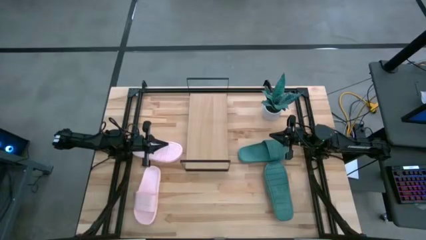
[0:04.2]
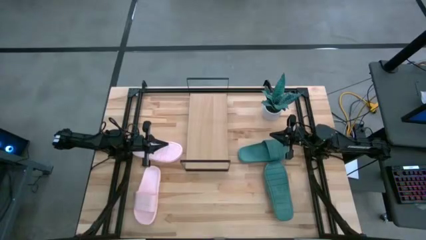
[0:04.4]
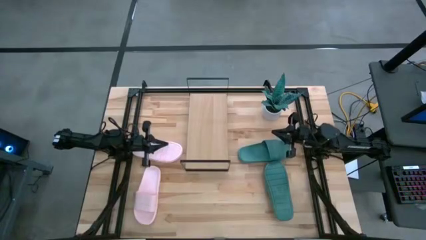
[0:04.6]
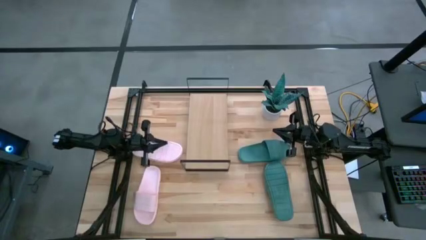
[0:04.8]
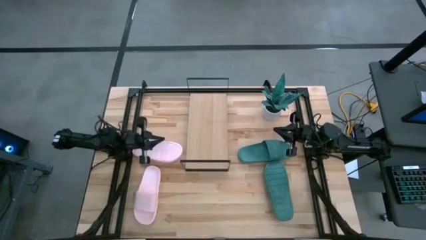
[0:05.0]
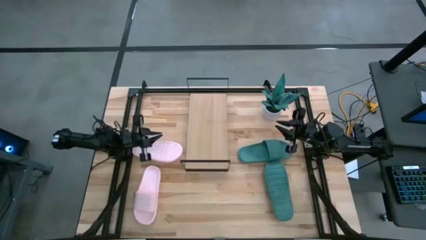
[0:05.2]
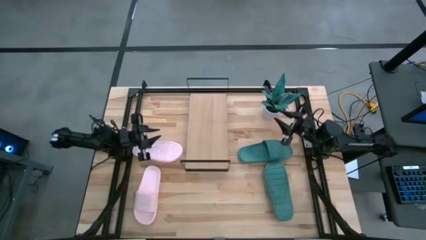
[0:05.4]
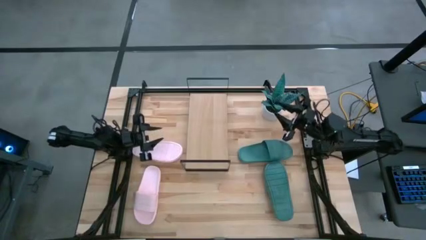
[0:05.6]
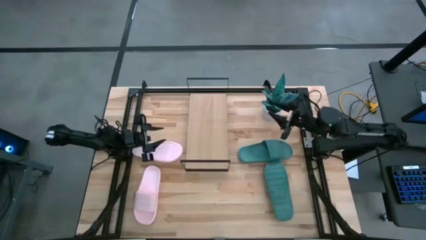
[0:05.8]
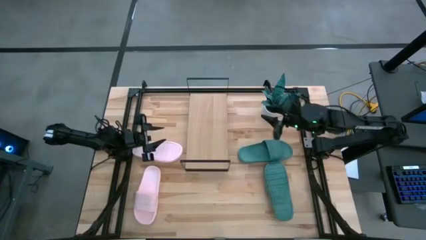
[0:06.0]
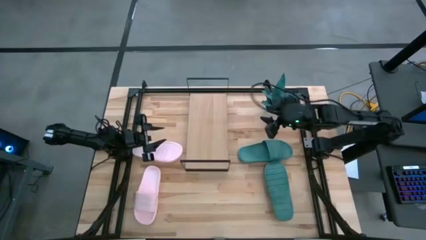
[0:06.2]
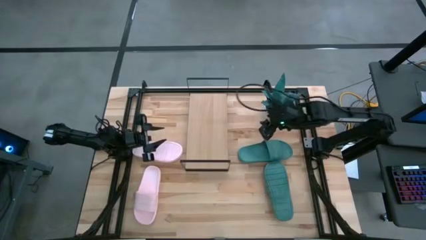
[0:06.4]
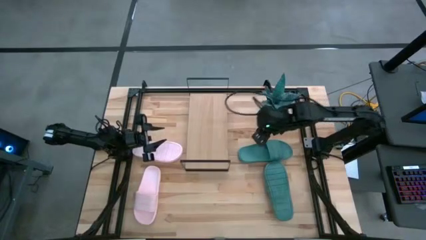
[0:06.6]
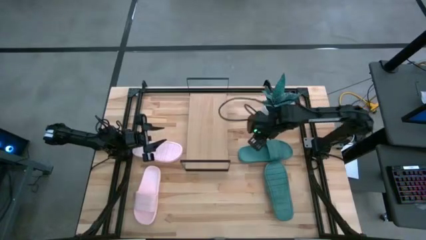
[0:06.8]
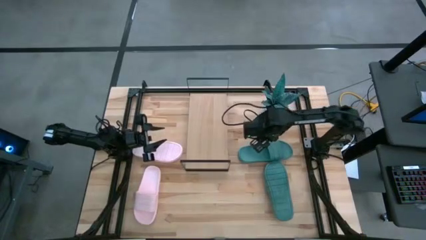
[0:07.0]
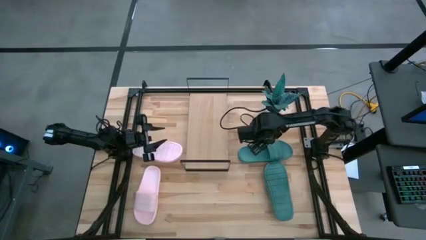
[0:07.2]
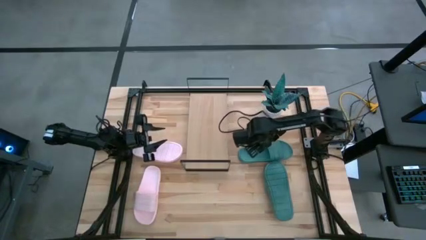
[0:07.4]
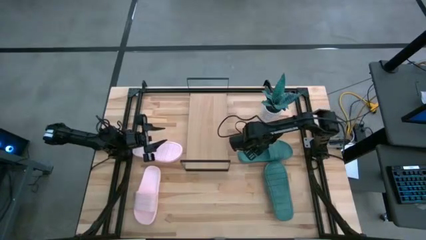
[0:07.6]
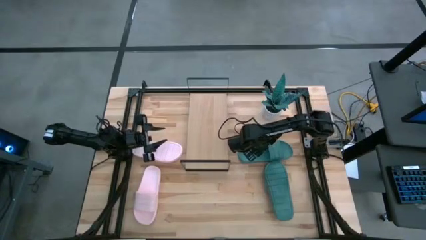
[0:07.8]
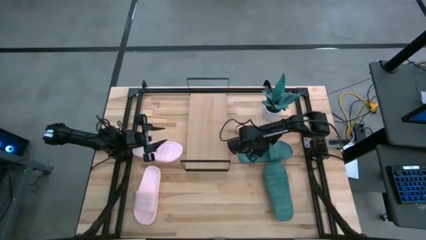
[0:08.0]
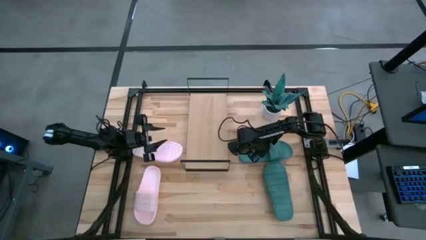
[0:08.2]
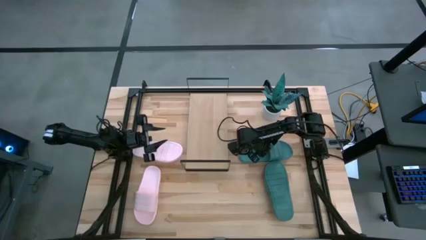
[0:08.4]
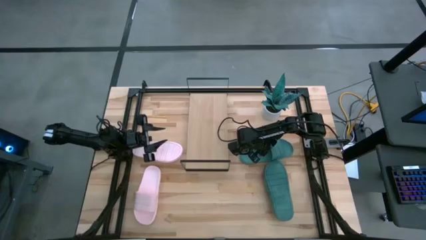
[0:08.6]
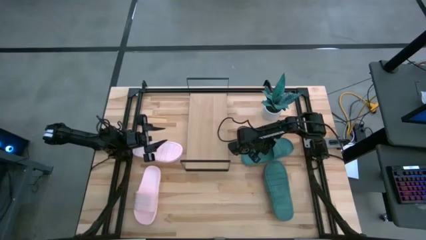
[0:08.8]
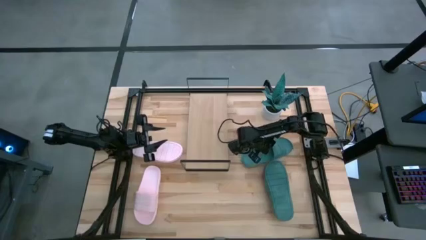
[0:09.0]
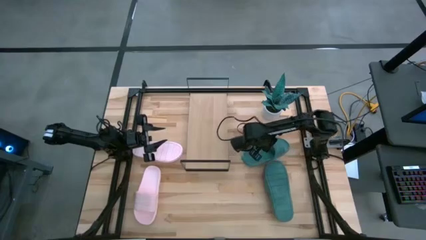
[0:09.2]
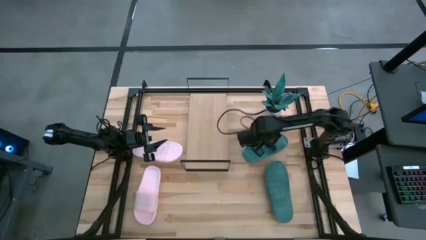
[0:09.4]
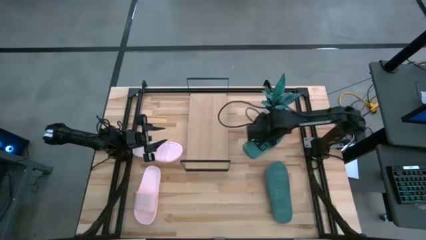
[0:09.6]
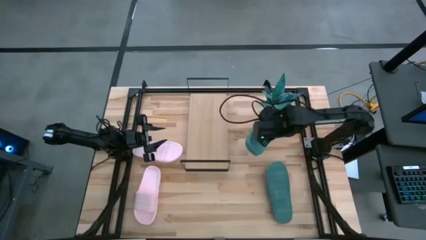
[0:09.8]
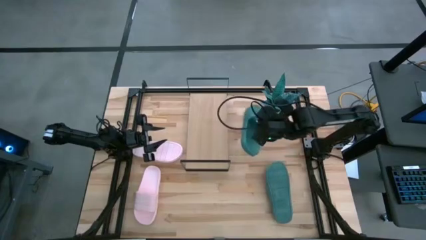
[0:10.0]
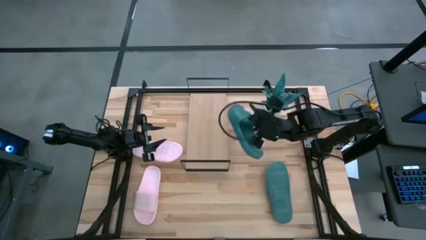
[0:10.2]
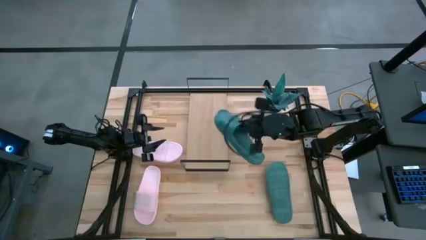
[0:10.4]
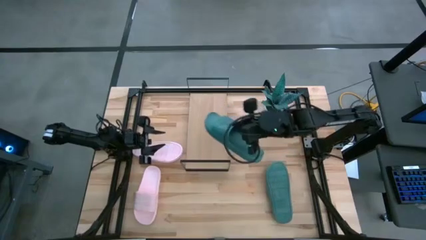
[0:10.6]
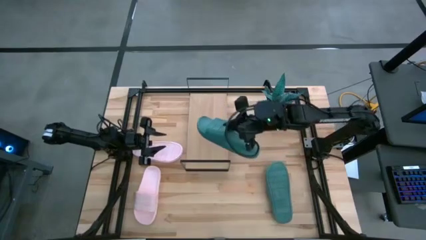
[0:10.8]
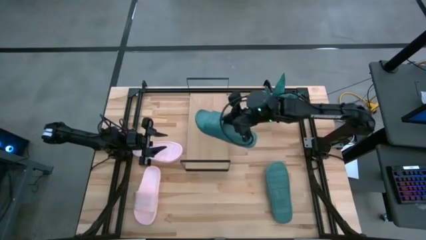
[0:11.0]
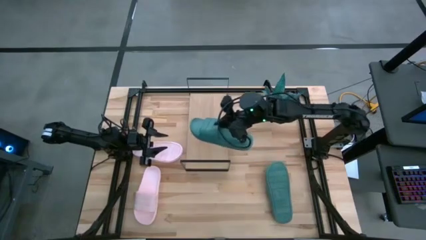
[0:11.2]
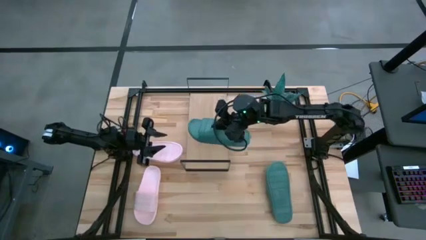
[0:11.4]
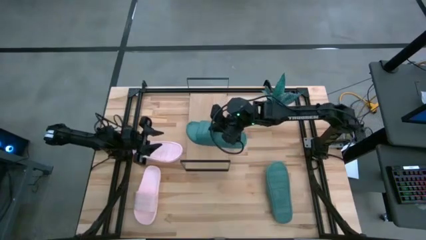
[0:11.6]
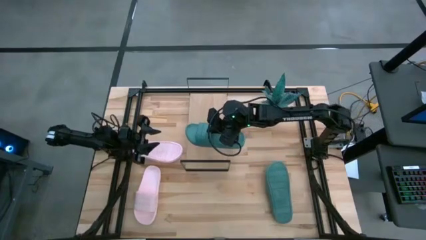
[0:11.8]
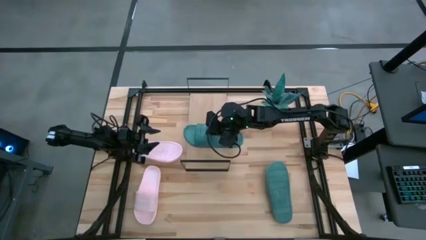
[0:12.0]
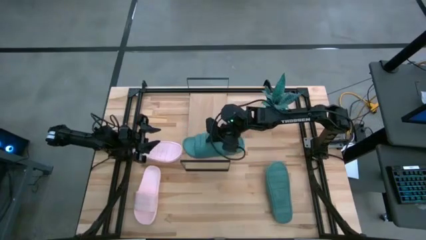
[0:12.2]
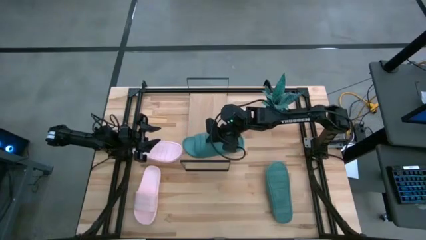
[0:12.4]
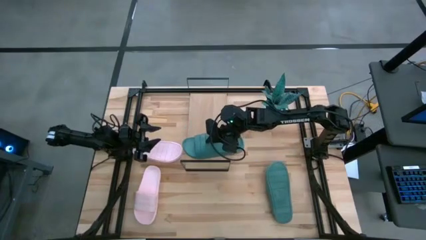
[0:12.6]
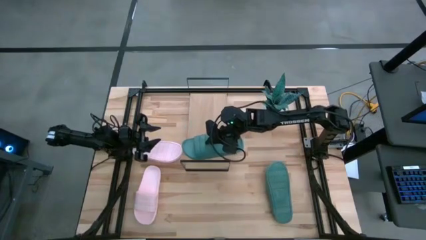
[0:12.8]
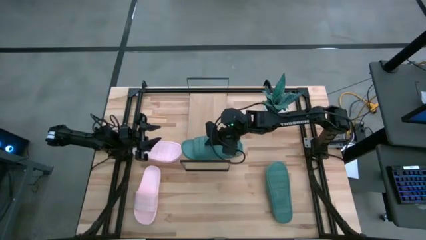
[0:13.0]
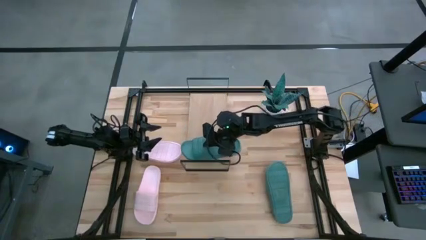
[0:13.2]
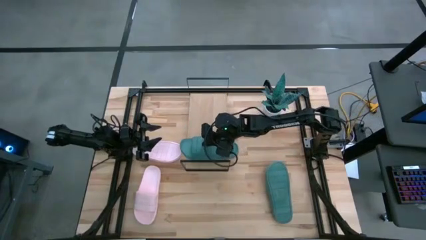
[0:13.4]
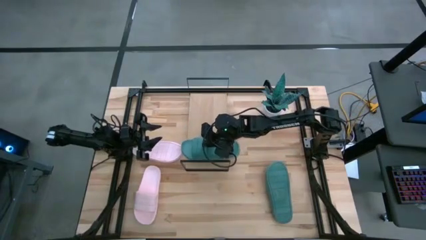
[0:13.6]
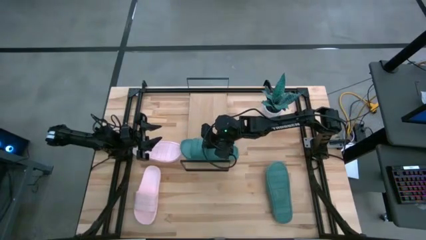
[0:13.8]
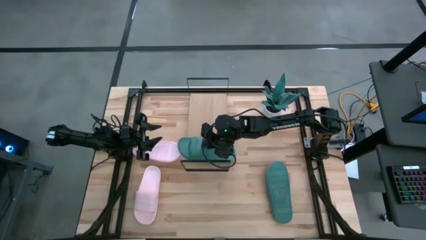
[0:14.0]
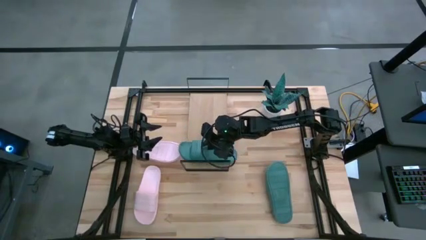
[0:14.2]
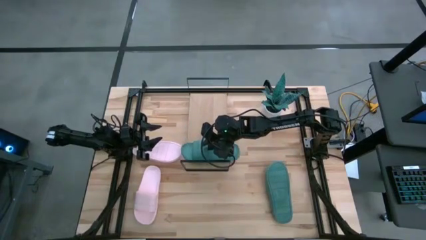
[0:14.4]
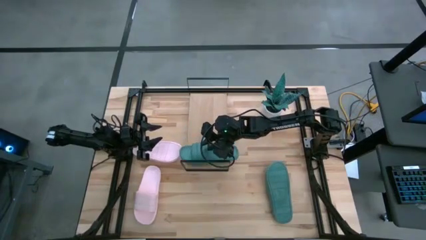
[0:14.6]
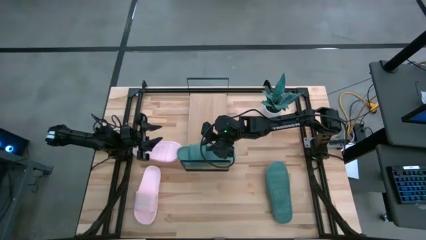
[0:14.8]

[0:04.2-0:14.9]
Task: Pick and place slides into the shelf
Put the top green slipper on the shelf
